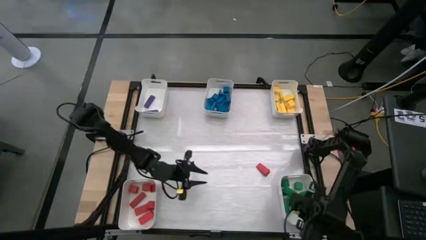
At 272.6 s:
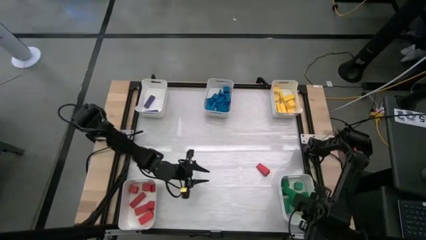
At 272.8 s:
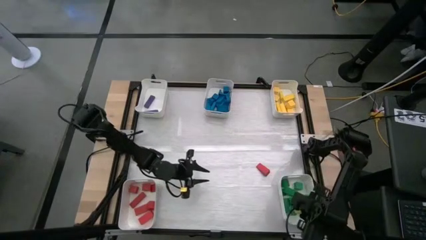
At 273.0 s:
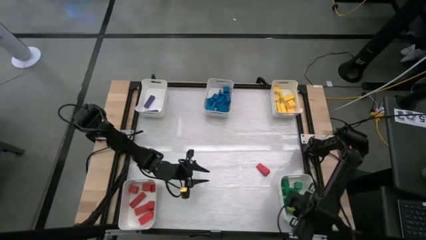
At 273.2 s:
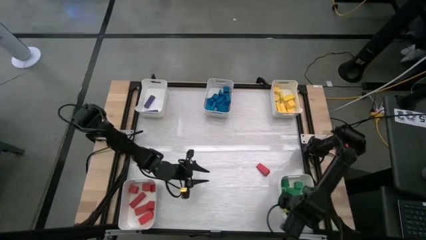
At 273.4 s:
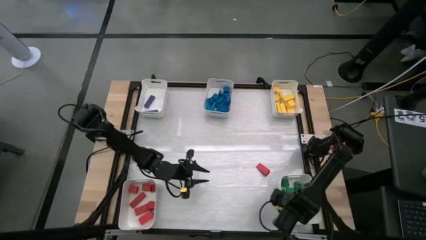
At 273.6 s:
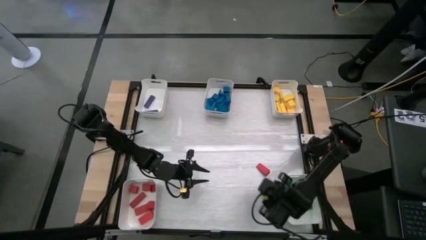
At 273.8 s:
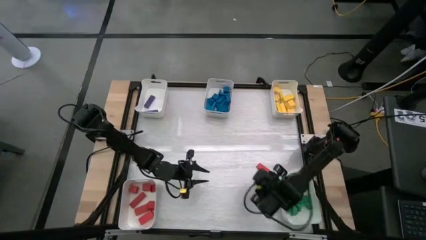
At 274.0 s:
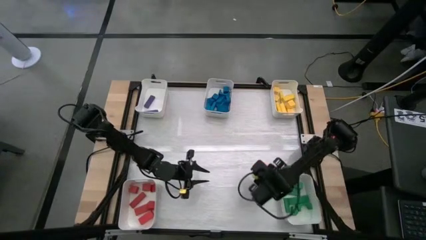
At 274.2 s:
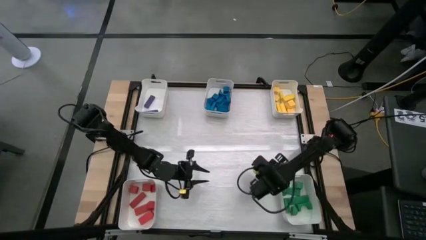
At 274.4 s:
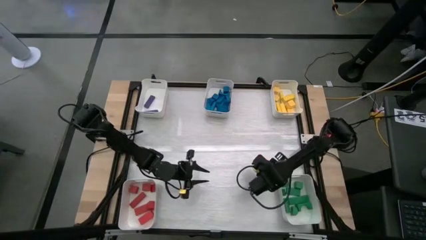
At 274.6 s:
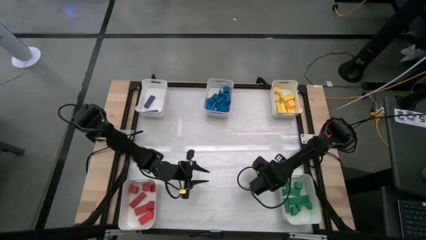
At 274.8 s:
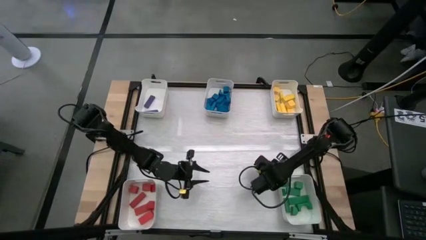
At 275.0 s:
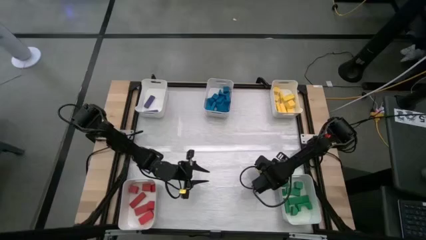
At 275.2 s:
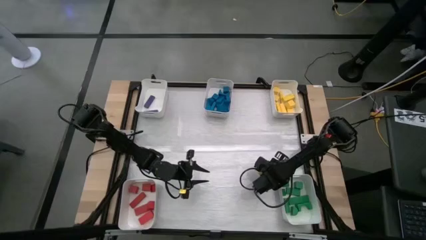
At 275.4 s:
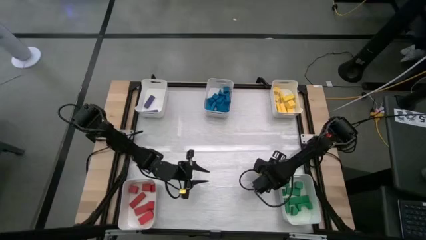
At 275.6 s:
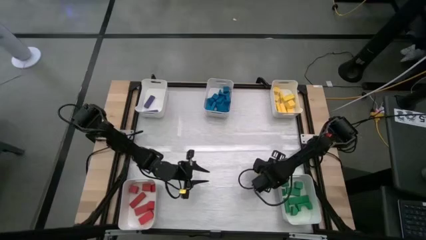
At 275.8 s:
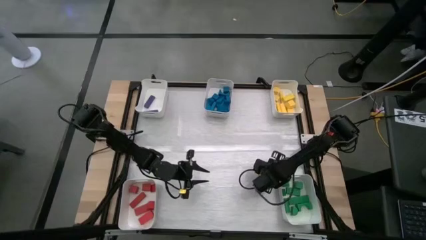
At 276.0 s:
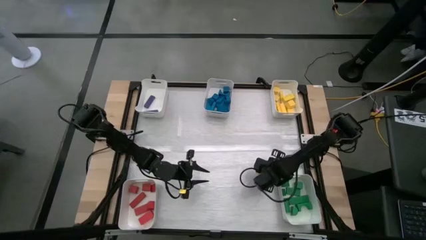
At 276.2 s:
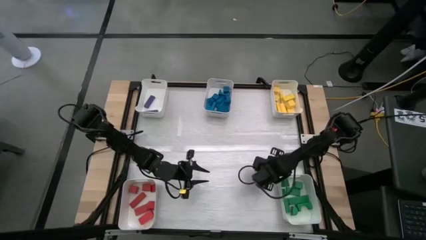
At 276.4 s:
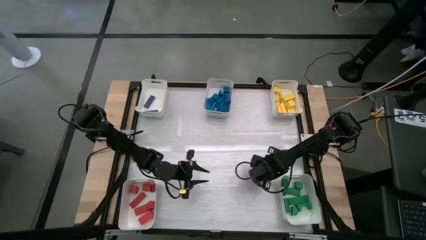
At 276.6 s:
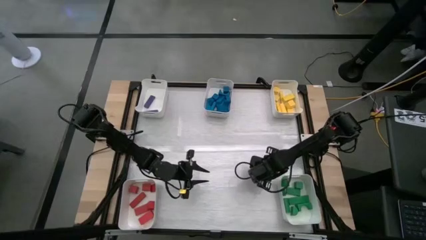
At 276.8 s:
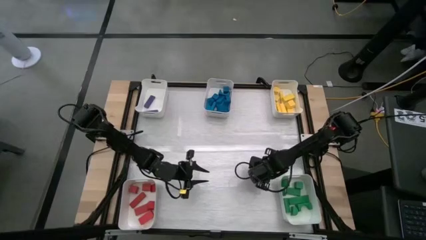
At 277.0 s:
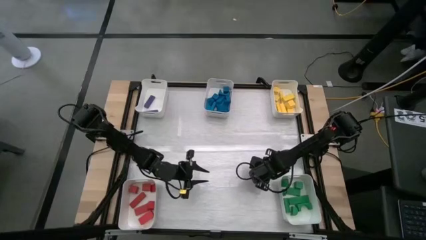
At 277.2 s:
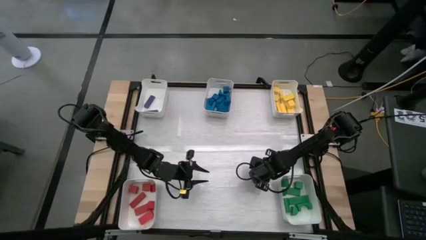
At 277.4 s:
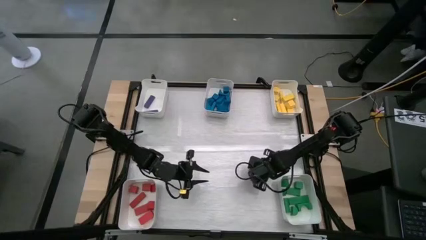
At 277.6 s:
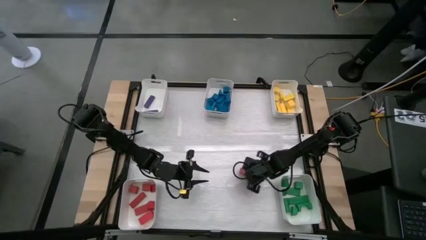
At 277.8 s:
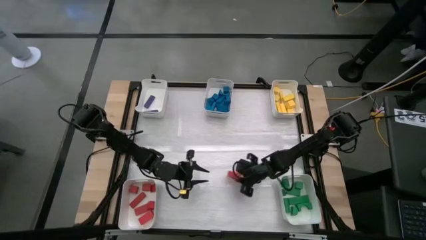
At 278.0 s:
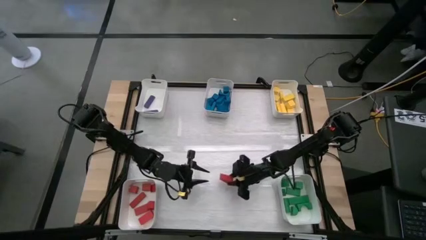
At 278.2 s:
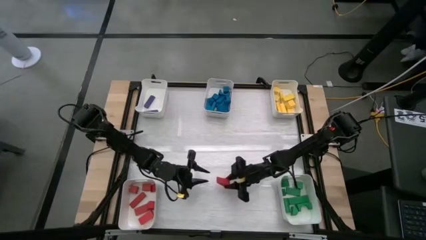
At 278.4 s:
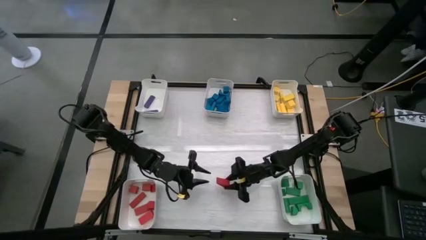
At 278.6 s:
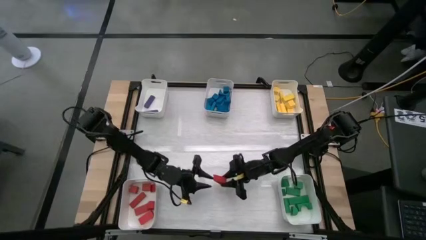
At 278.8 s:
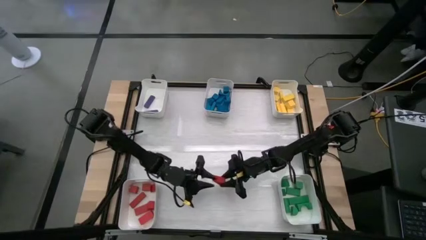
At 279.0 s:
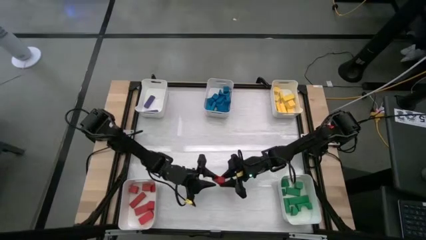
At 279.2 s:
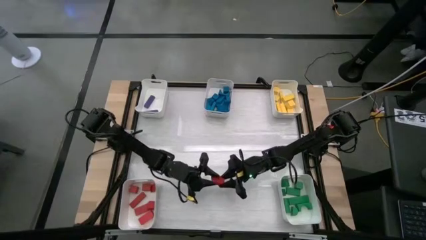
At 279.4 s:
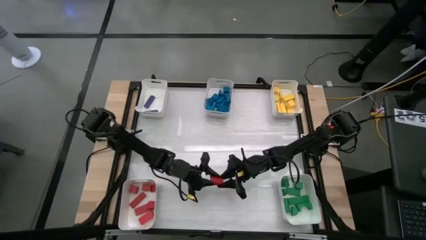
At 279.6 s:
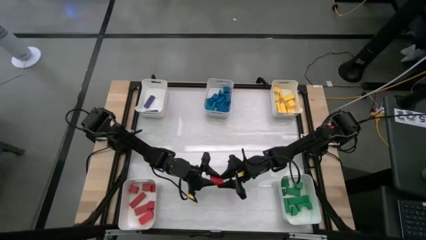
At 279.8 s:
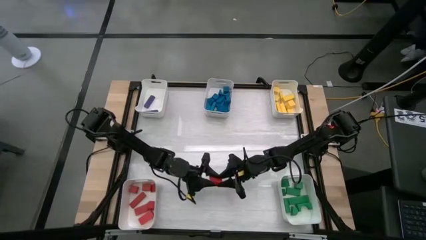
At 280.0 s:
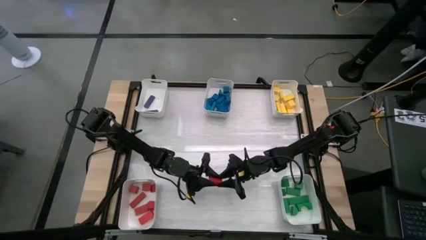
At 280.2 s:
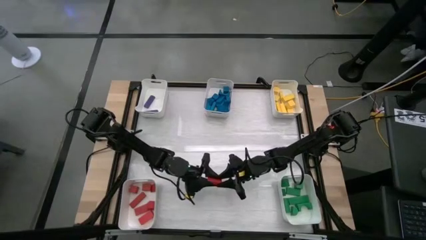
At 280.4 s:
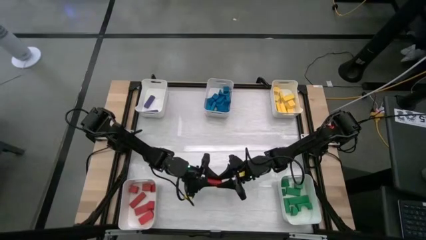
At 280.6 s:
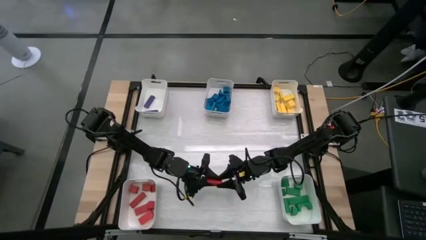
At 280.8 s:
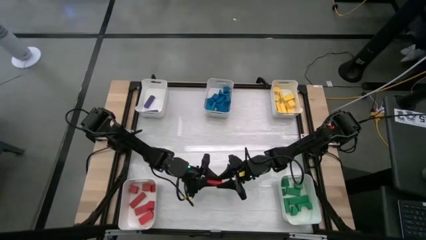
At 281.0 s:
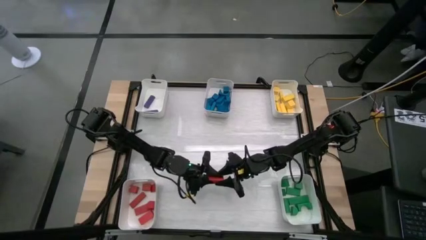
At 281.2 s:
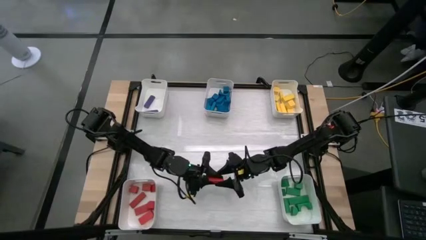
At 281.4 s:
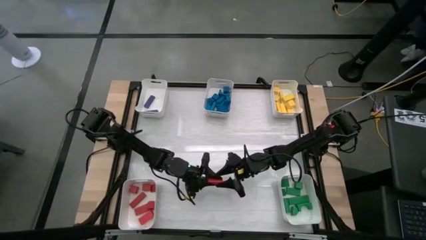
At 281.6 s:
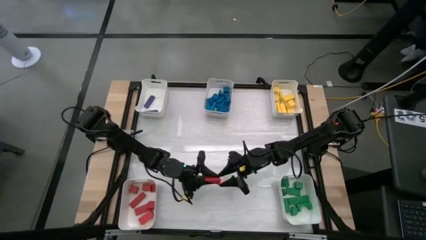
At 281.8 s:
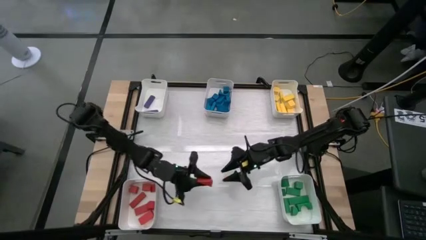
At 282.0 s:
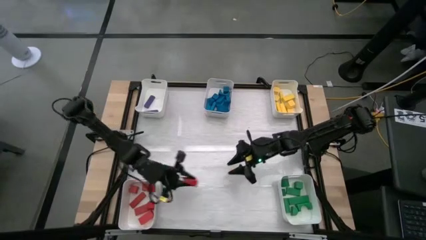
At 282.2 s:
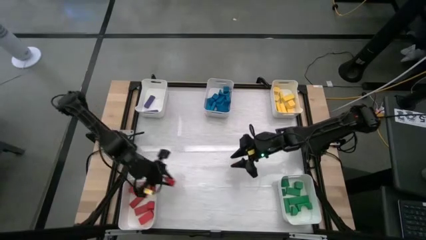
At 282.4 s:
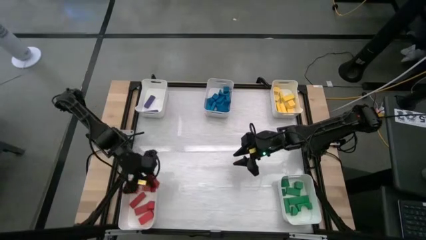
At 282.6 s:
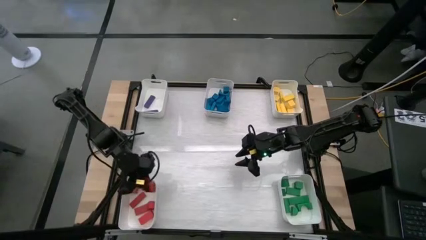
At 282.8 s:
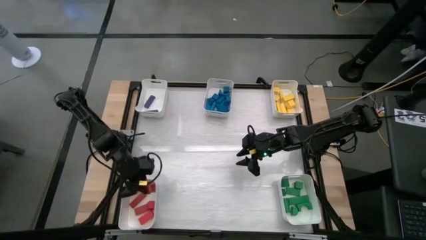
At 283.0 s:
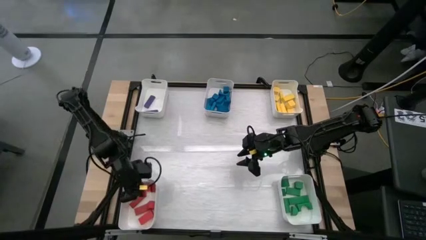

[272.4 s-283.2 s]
Task: Sort blocks
Put the red block into the bottom left white bin

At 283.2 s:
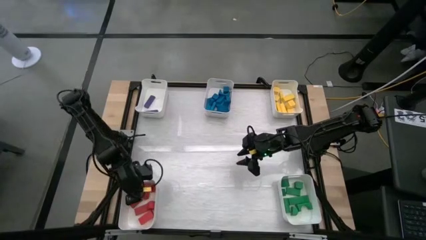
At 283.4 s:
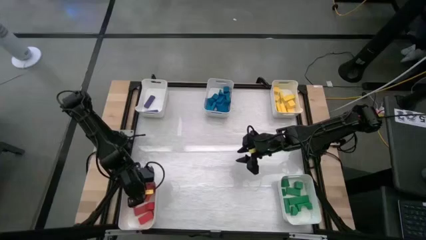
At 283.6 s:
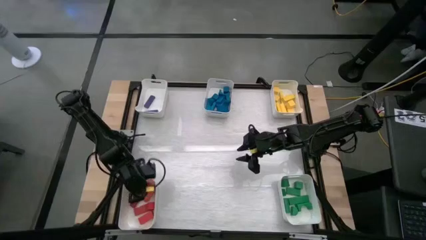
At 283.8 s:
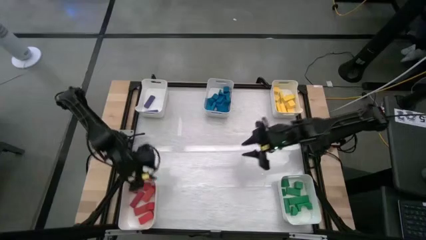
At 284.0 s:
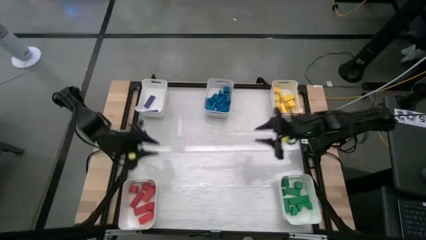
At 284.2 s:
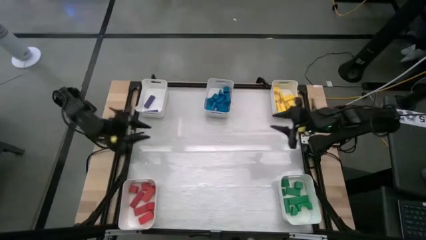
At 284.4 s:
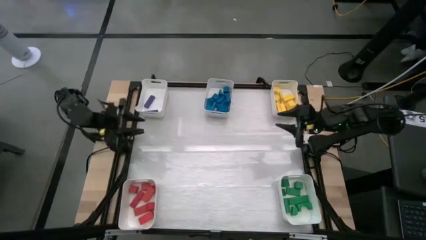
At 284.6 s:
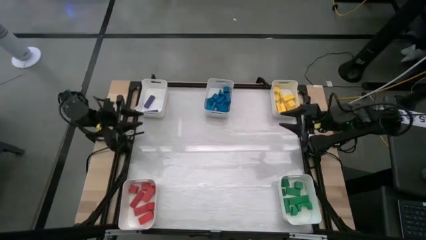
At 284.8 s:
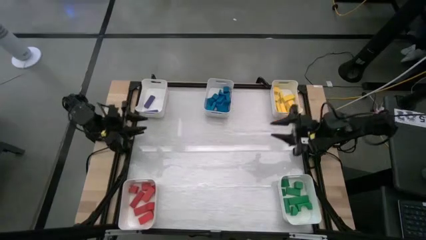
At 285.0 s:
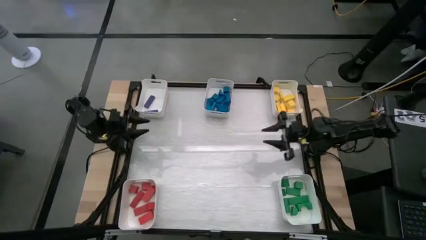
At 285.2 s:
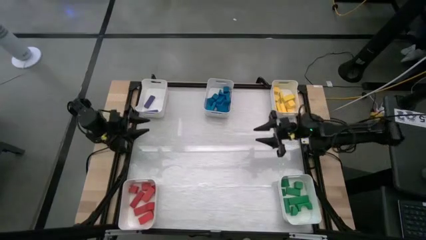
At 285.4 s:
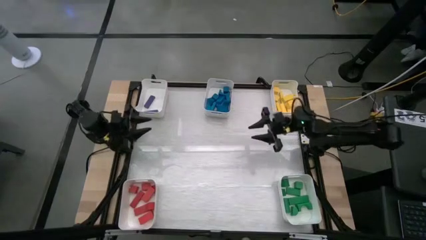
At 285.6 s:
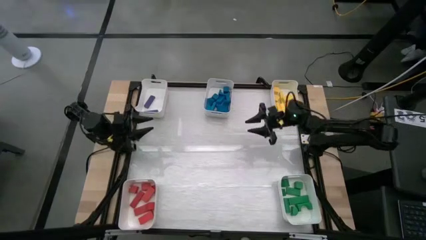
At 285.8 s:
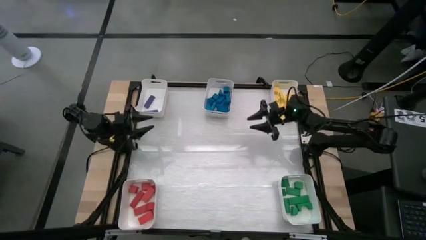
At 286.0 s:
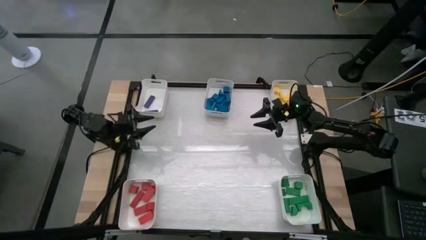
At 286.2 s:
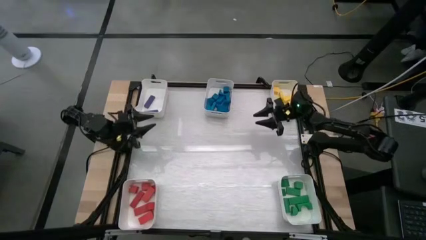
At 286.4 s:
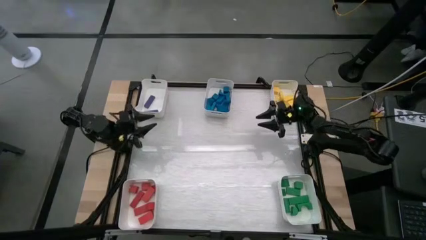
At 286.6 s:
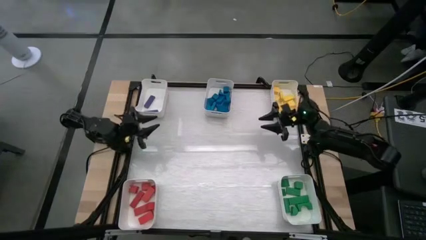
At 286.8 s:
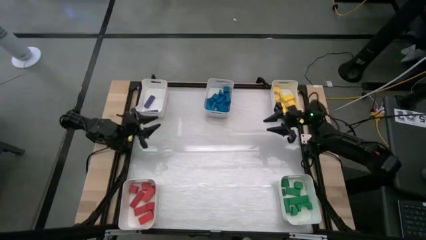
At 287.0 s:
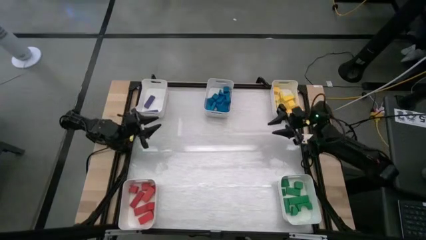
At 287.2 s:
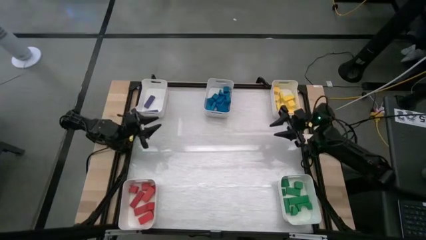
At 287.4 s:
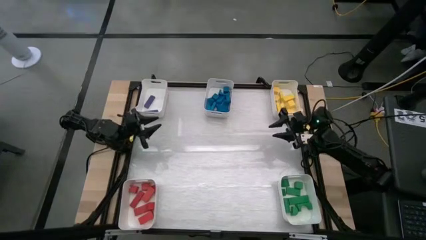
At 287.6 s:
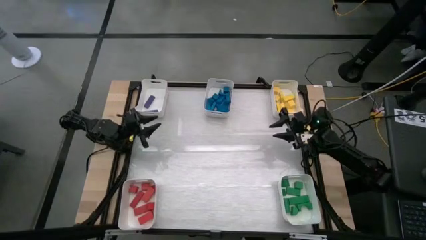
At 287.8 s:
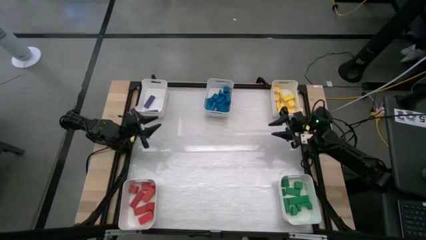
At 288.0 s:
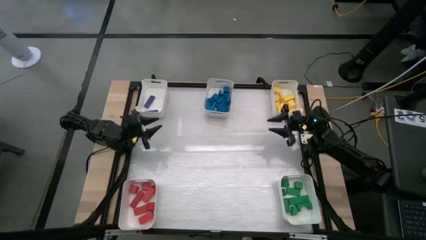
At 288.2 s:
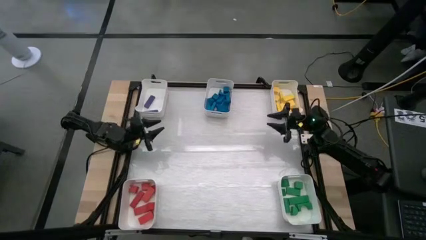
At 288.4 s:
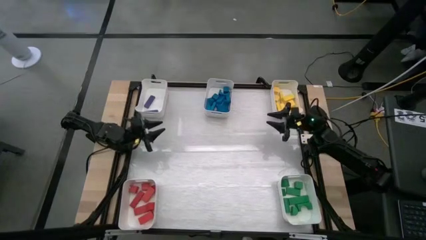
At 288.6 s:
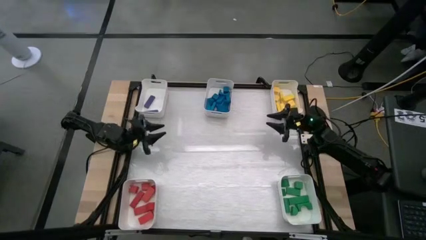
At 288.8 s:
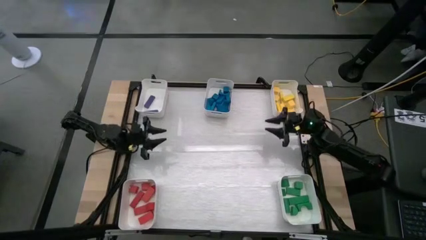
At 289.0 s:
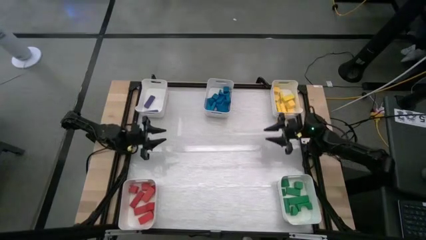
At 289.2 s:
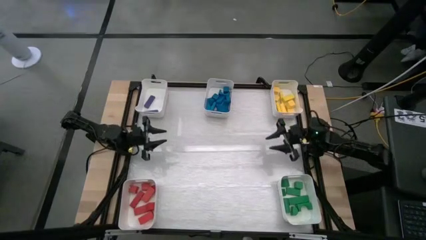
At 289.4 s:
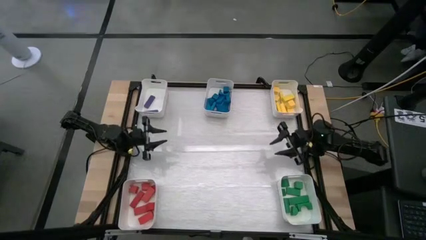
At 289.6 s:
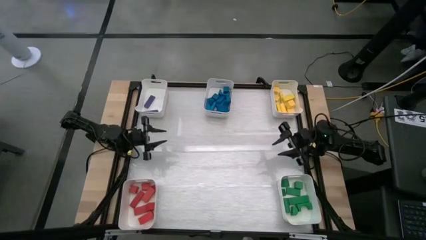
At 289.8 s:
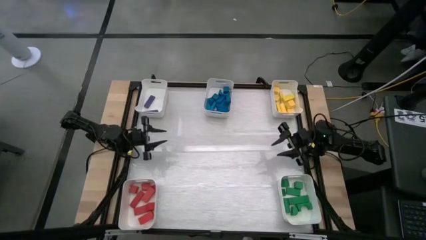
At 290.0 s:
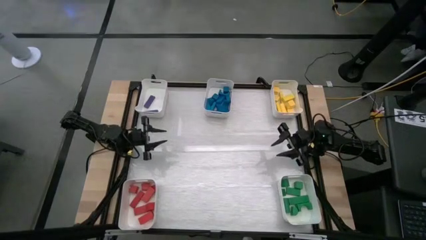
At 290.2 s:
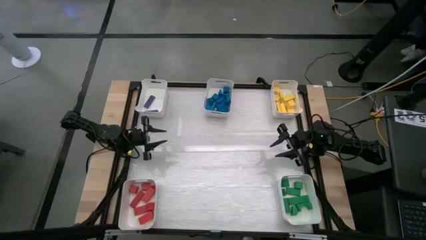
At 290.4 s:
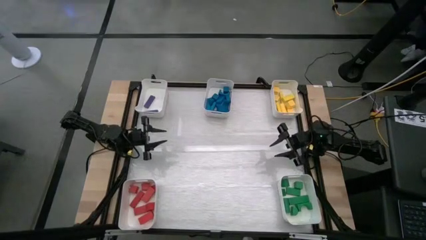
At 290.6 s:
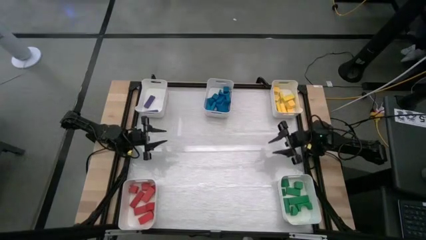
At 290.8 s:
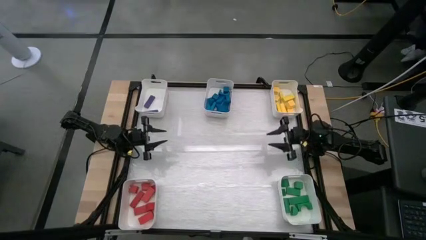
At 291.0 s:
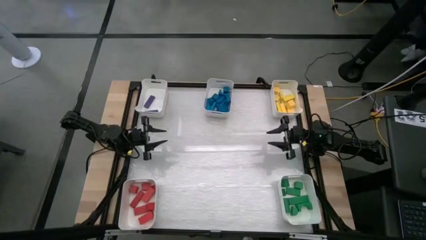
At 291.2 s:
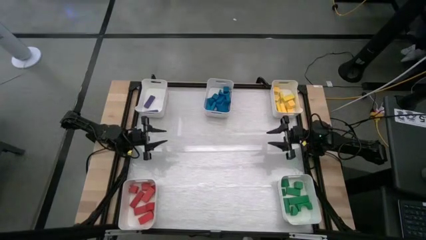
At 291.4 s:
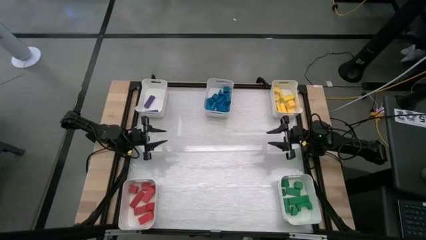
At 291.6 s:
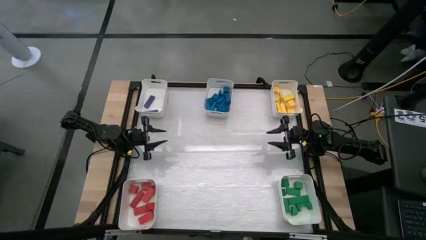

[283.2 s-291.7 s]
Return To Home position
